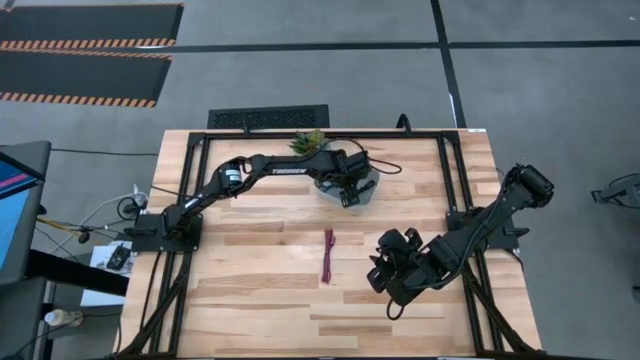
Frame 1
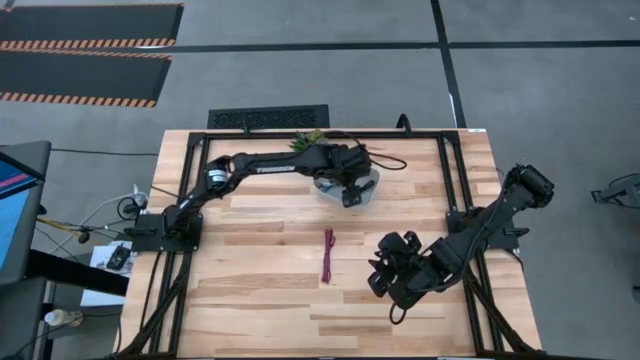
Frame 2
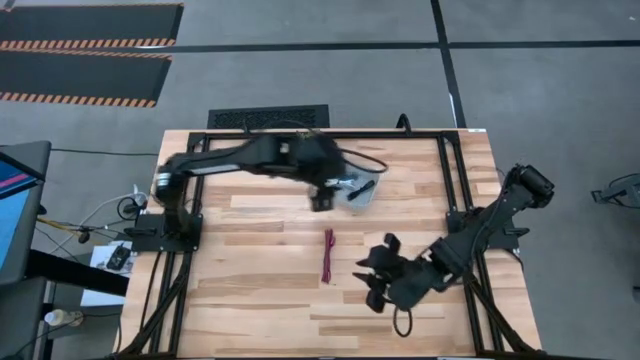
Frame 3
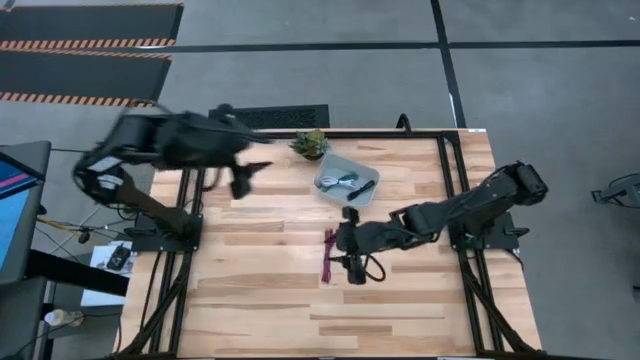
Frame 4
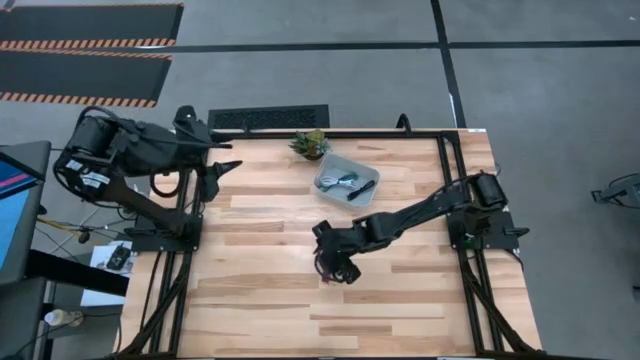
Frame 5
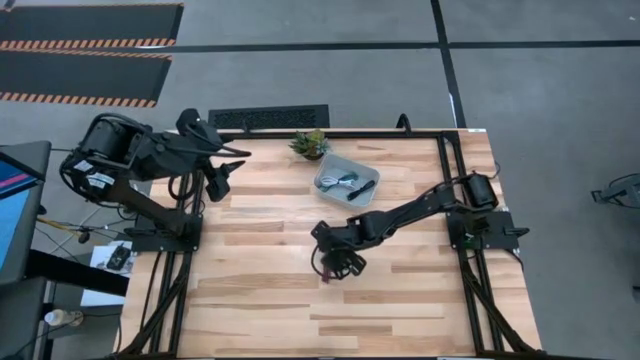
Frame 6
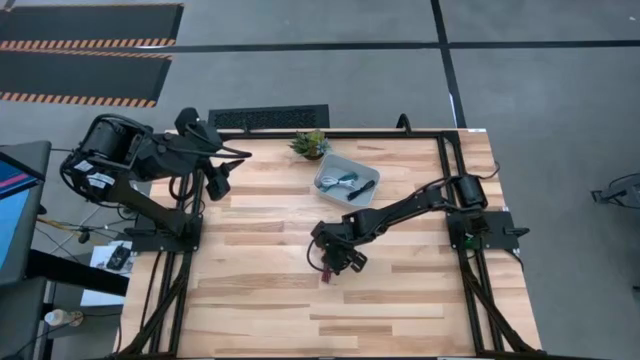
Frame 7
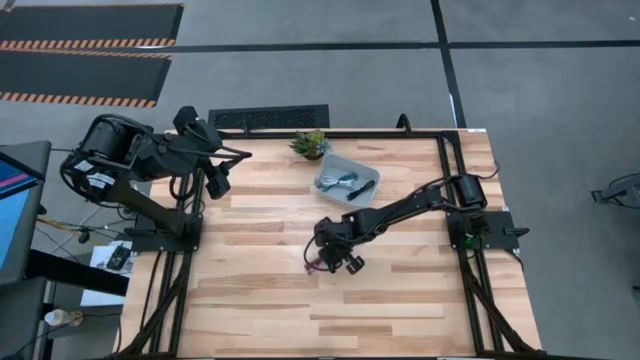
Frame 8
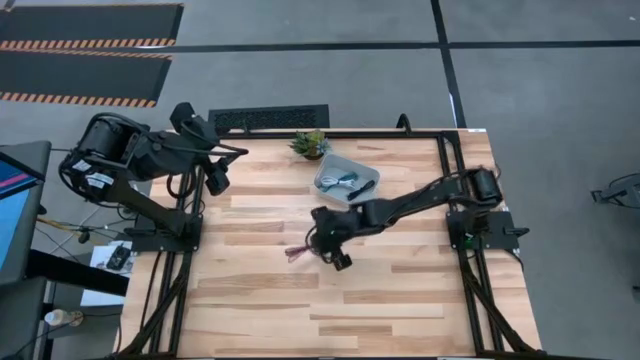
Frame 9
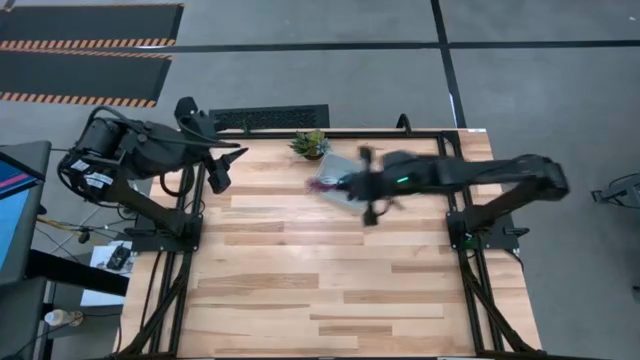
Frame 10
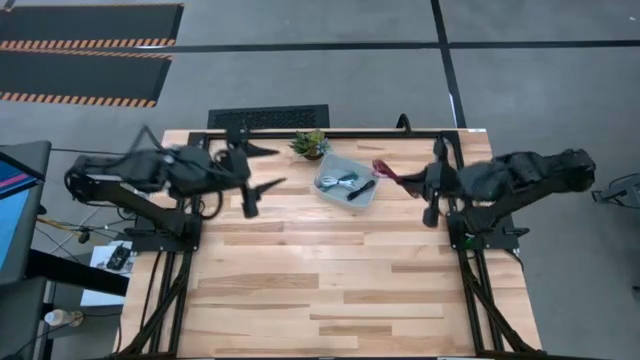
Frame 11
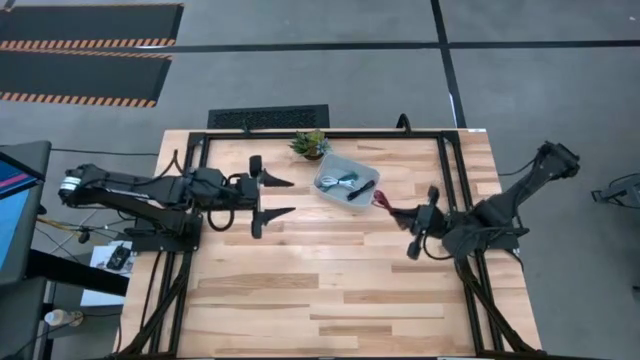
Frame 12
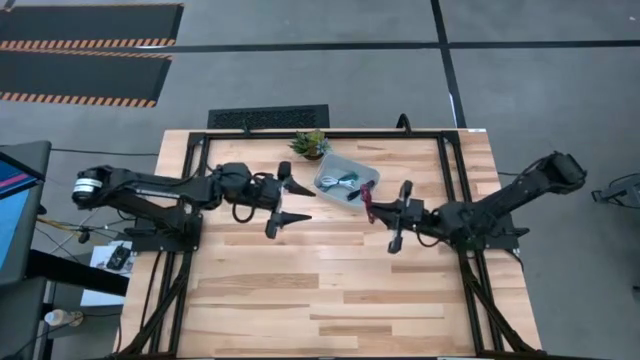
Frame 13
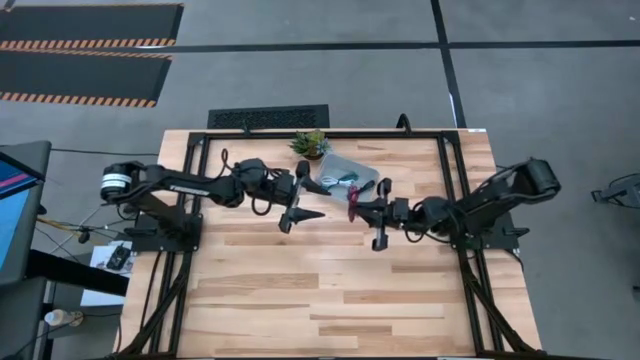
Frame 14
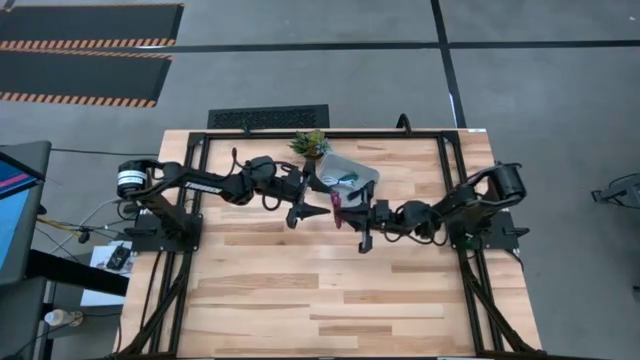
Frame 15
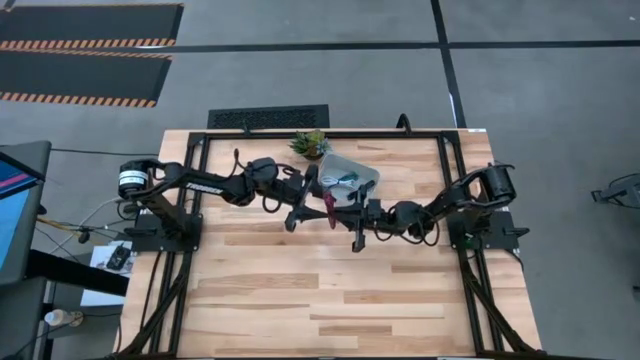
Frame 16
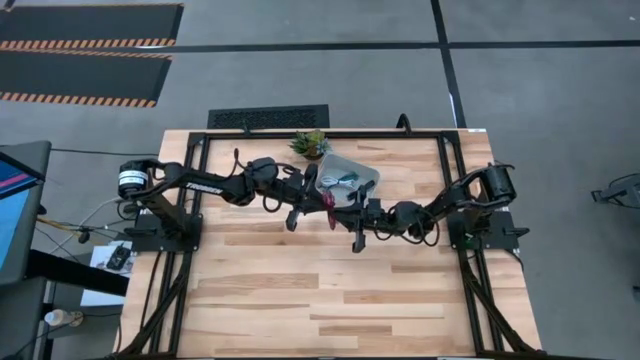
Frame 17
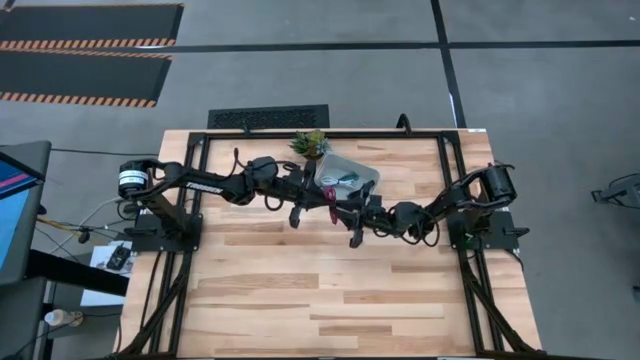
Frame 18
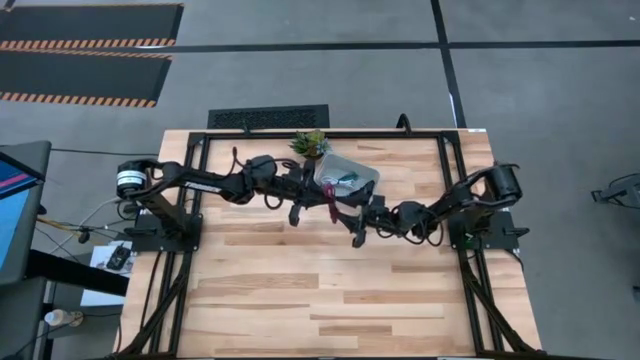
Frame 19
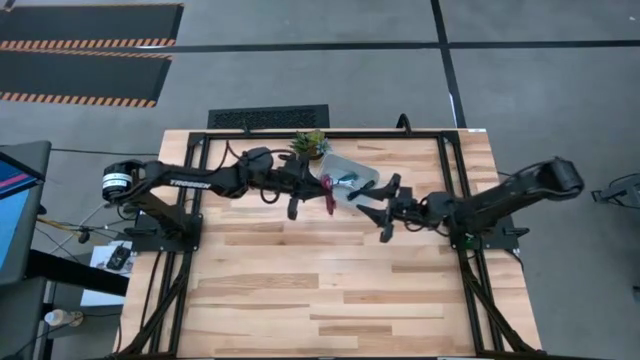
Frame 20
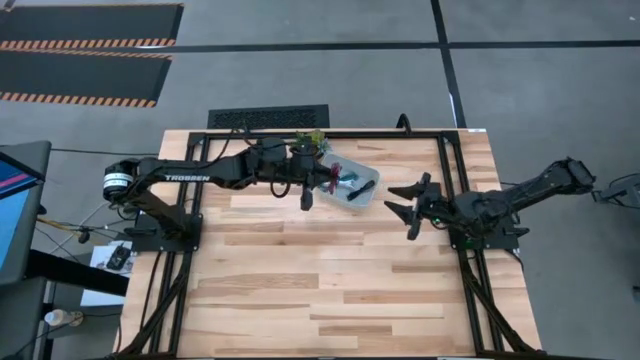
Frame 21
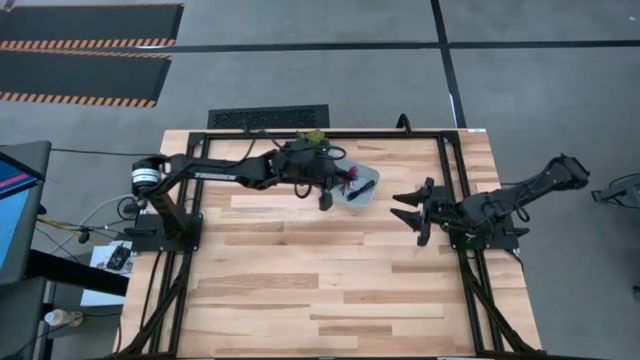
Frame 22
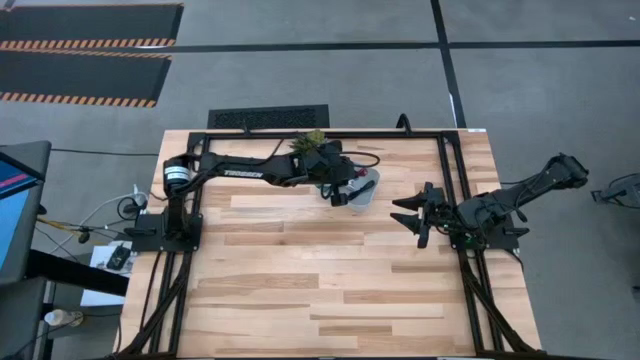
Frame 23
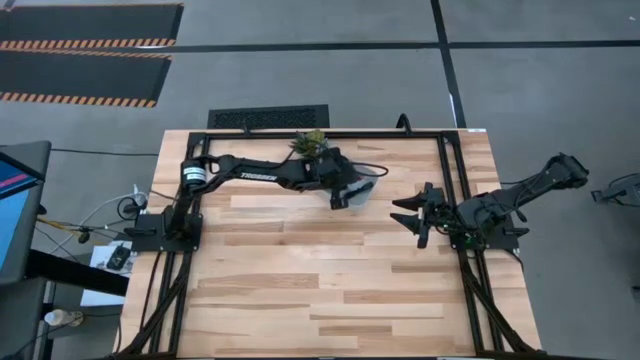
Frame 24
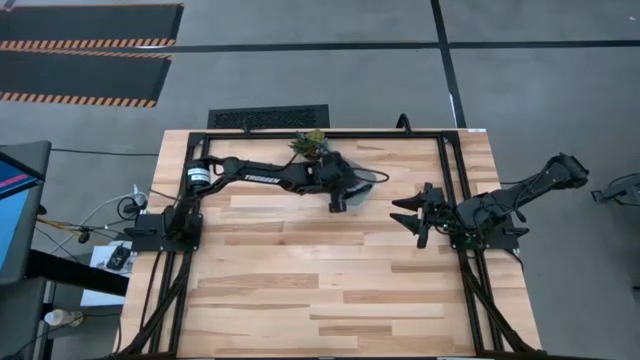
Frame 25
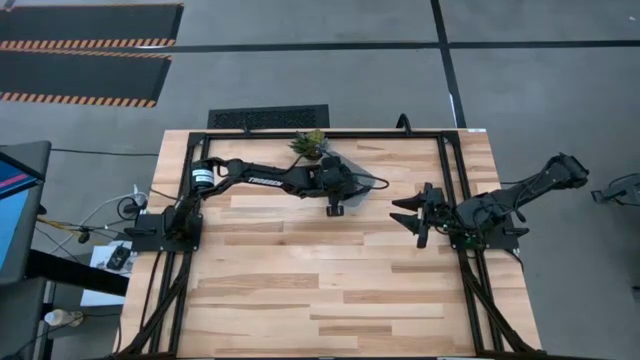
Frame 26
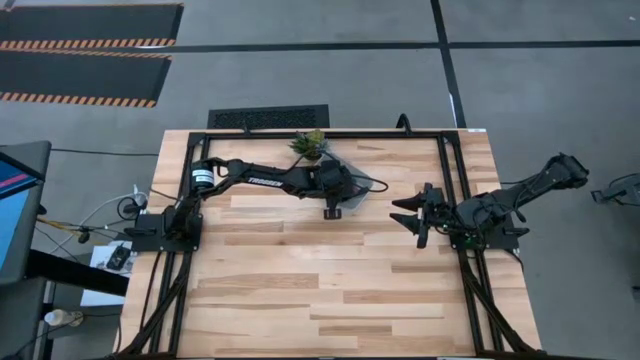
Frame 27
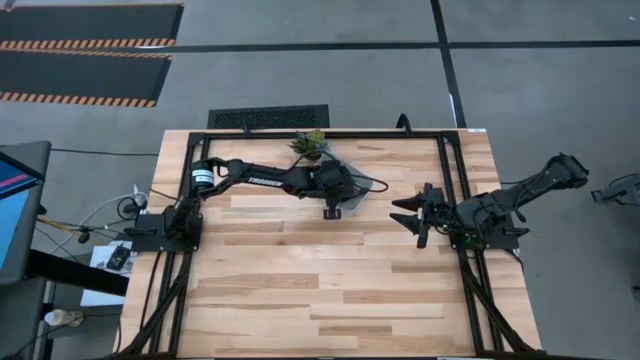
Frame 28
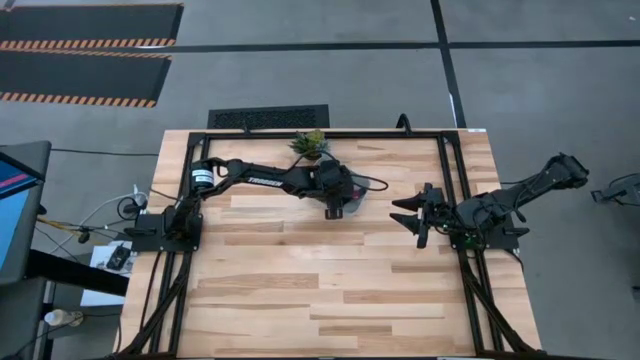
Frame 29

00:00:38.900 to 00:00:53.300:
Task: Pick and place USB-C Cables
Put the pink charger cable into the white bin

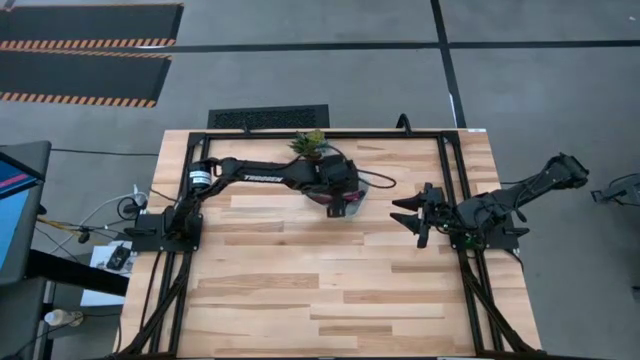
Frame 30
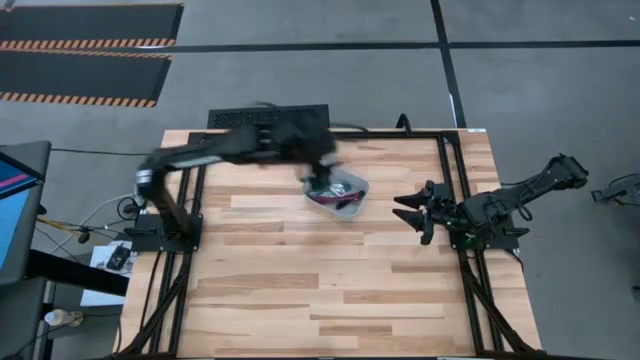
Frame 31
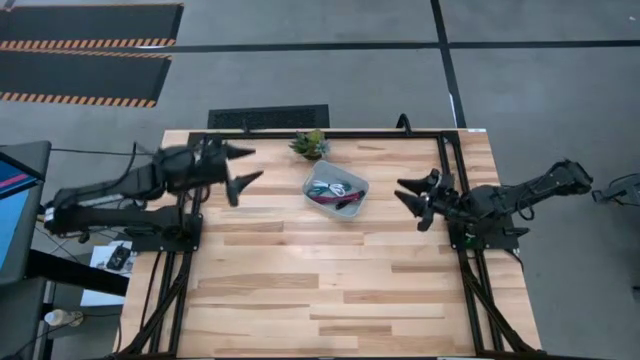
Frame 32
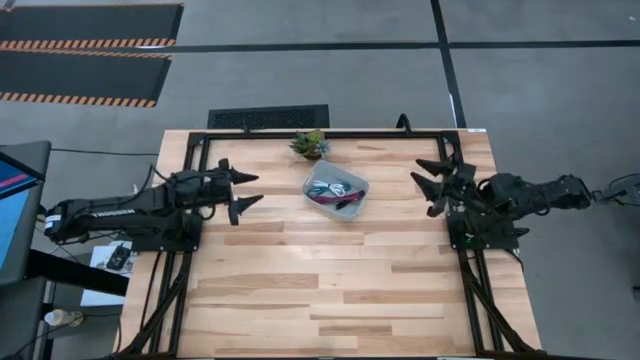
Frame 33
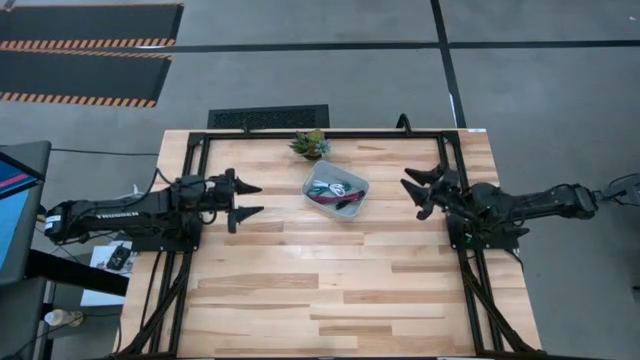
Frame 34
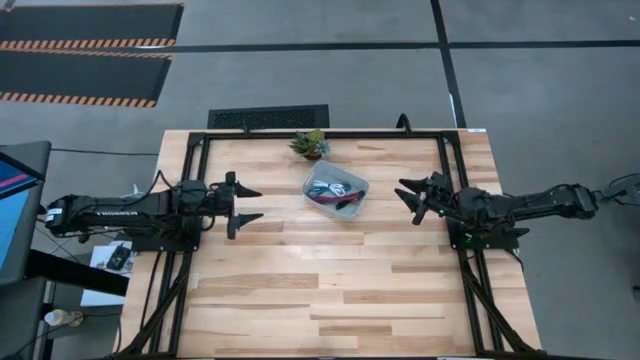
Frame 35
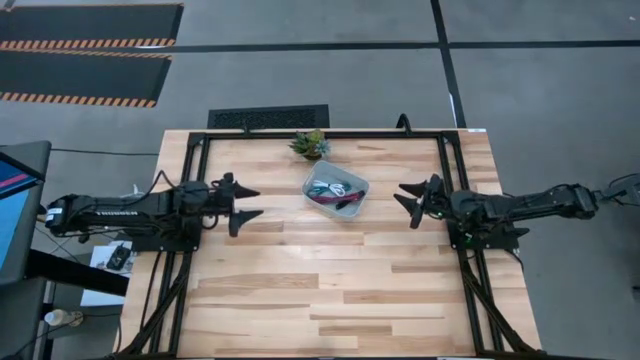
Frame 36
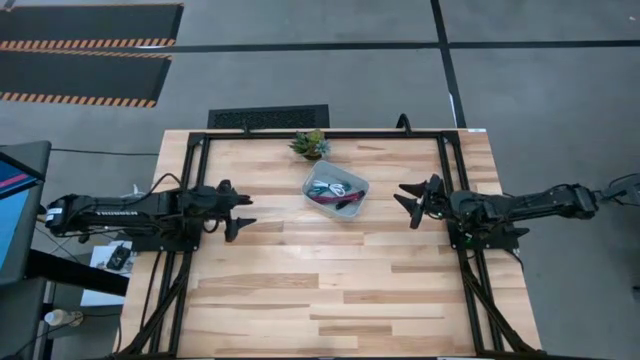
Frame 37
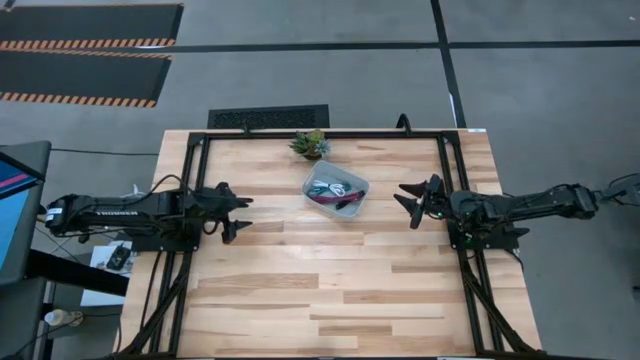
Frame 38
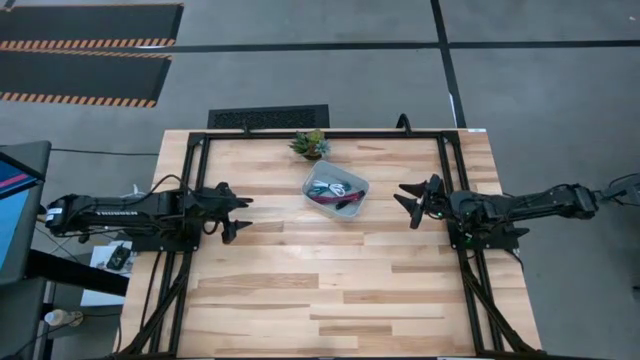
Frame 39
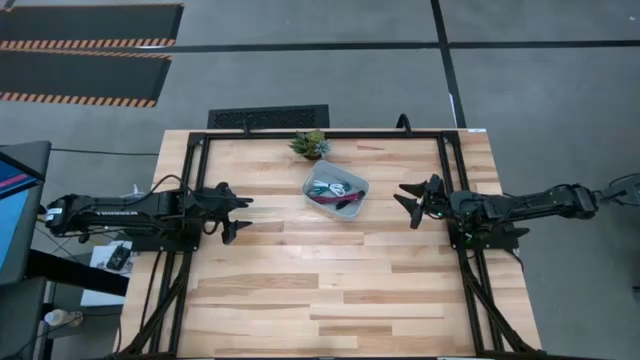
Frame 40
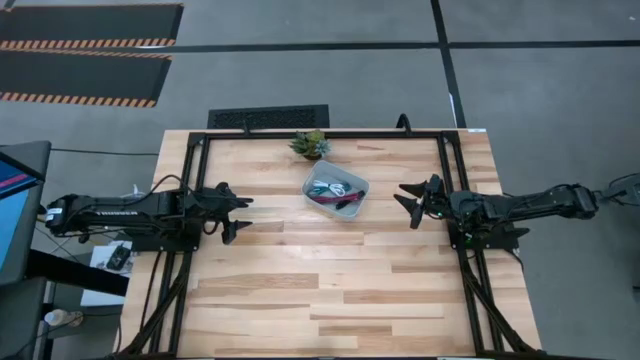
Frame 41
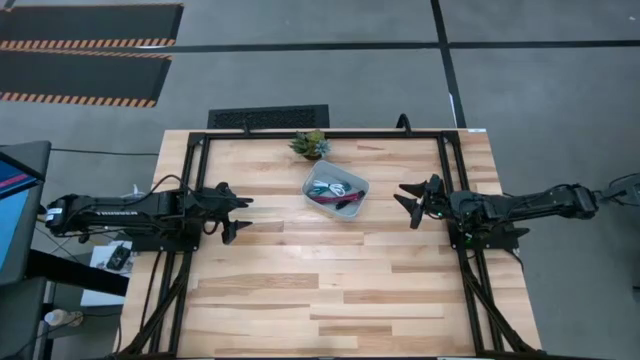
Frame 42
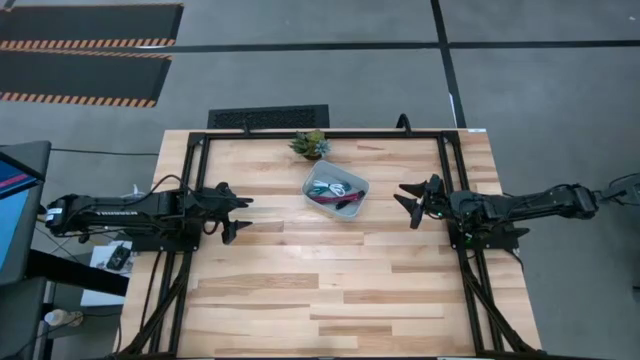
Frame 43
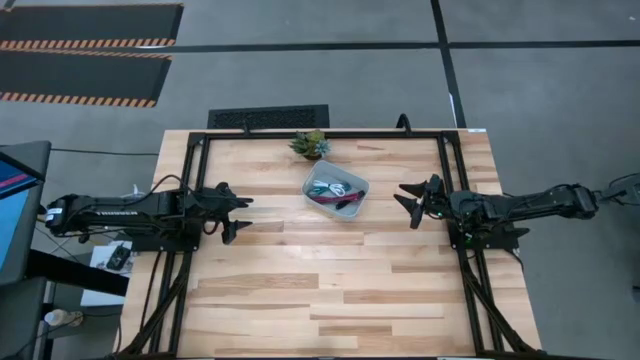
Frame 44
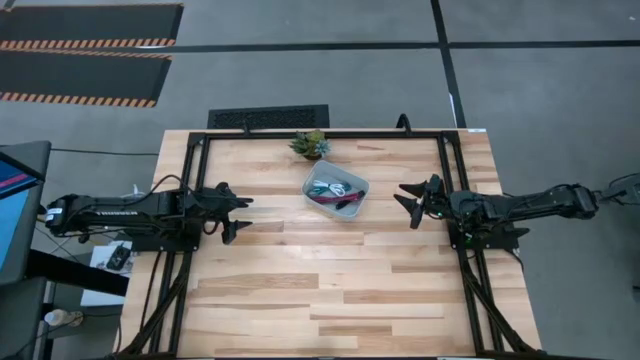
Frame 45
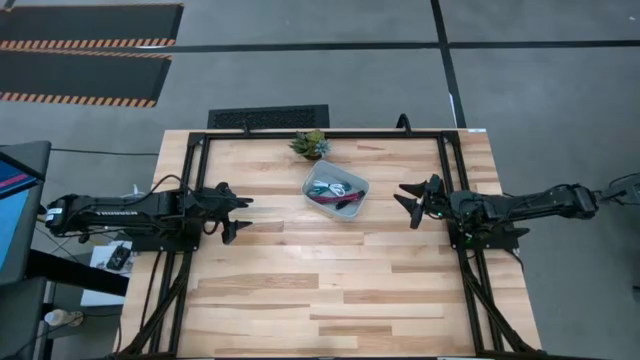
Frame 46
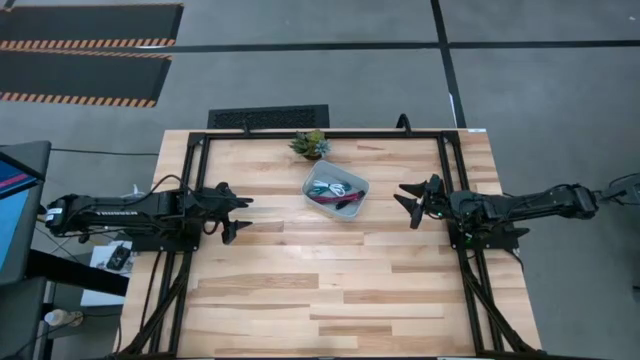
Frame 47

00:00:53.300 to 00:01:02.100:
Return to Home Position
